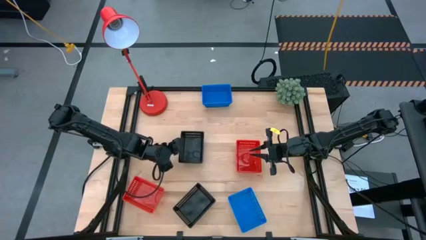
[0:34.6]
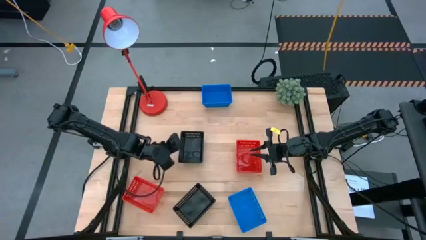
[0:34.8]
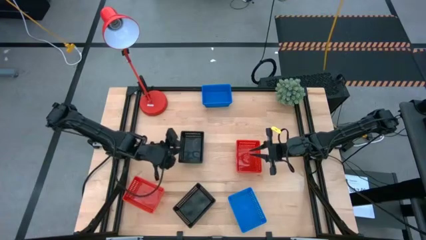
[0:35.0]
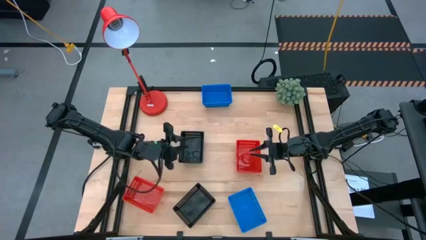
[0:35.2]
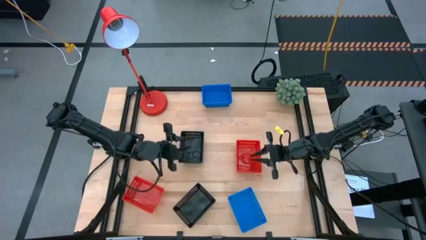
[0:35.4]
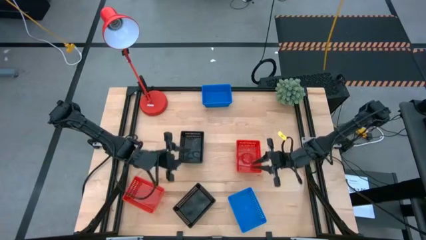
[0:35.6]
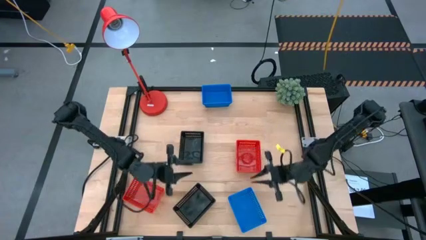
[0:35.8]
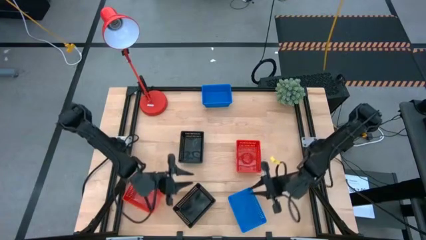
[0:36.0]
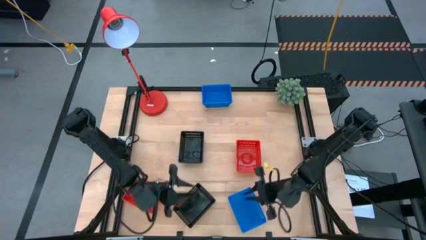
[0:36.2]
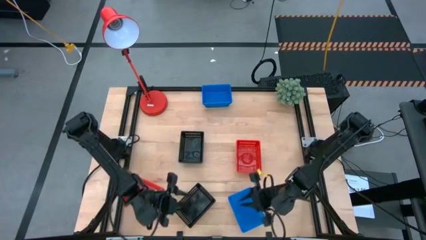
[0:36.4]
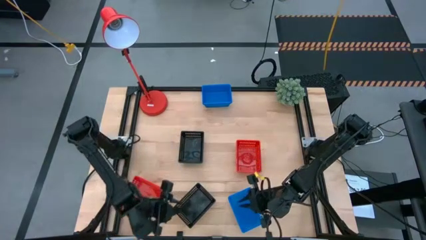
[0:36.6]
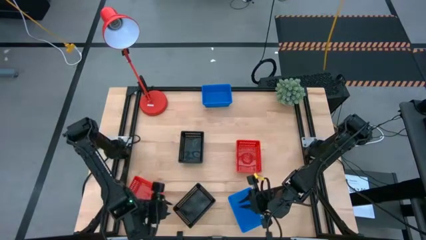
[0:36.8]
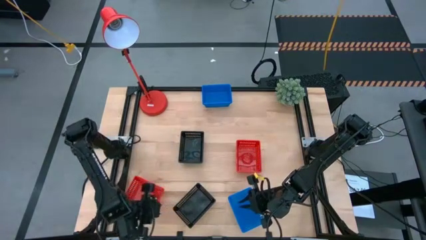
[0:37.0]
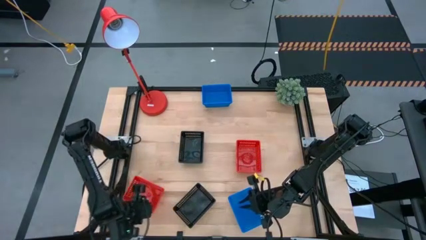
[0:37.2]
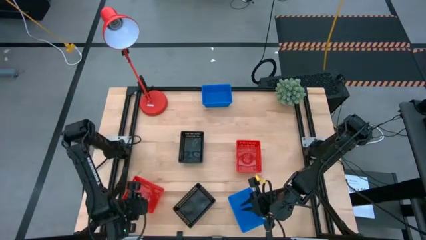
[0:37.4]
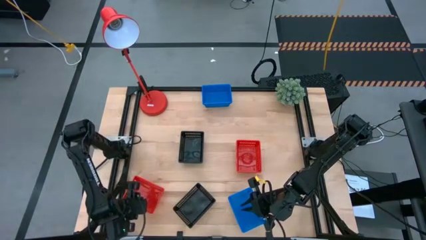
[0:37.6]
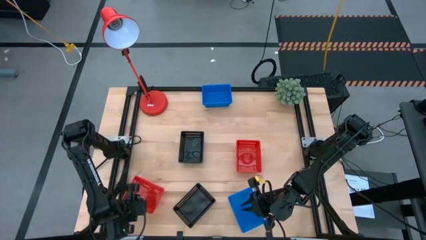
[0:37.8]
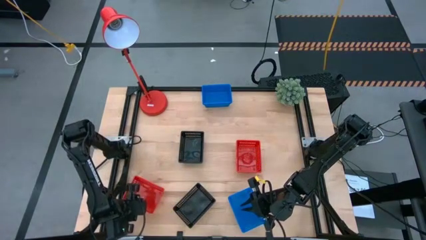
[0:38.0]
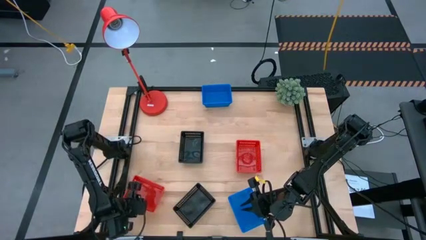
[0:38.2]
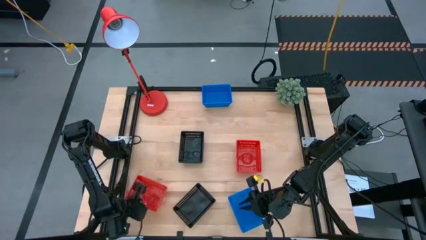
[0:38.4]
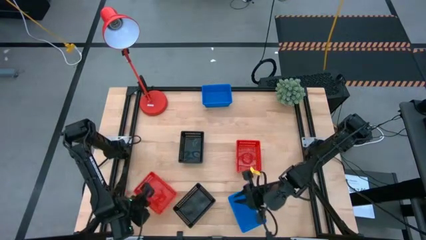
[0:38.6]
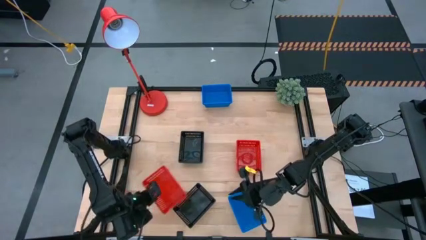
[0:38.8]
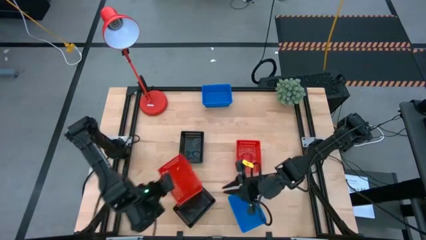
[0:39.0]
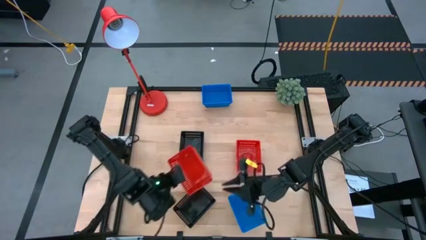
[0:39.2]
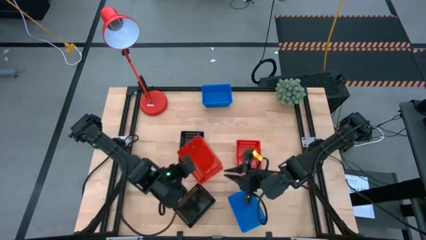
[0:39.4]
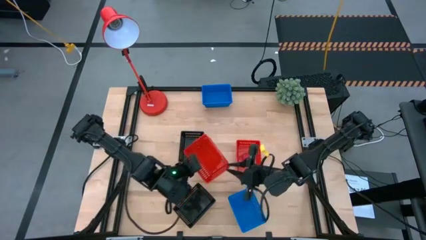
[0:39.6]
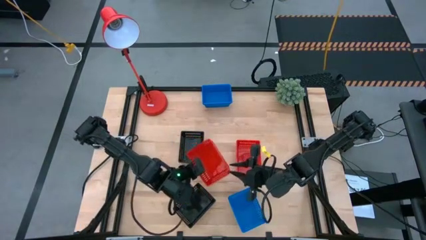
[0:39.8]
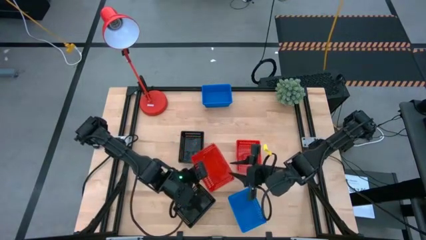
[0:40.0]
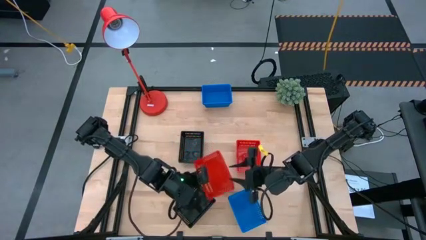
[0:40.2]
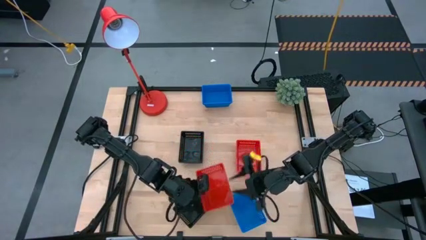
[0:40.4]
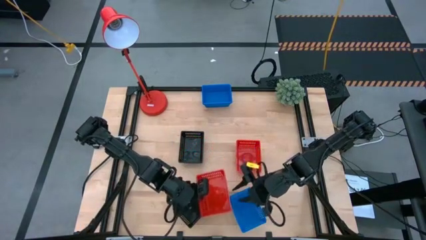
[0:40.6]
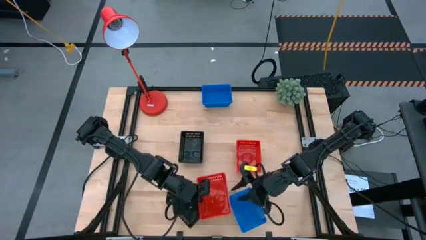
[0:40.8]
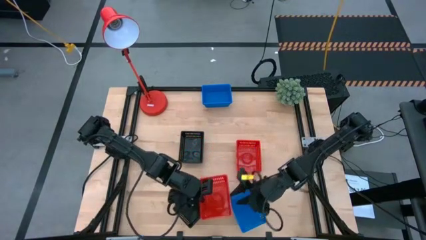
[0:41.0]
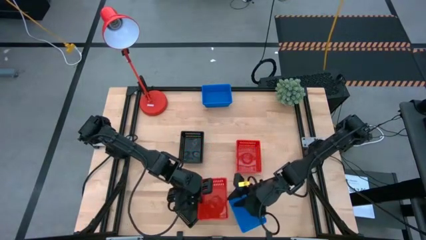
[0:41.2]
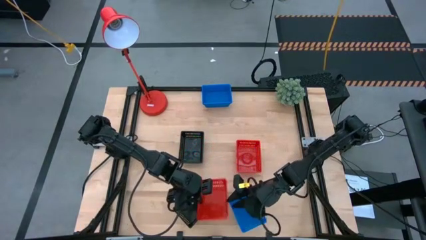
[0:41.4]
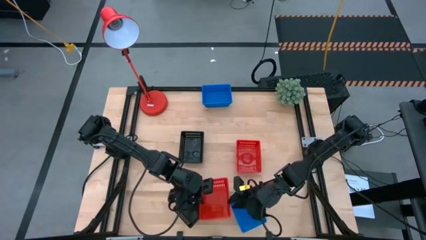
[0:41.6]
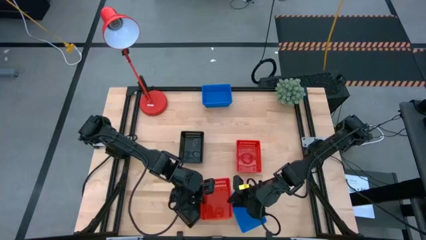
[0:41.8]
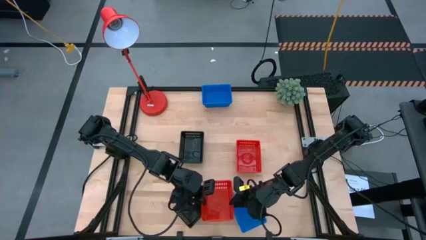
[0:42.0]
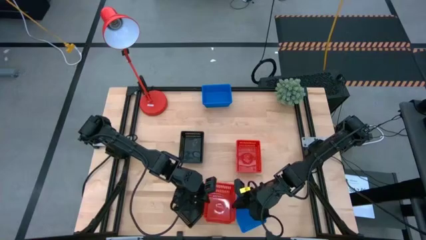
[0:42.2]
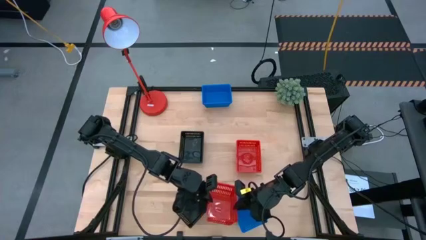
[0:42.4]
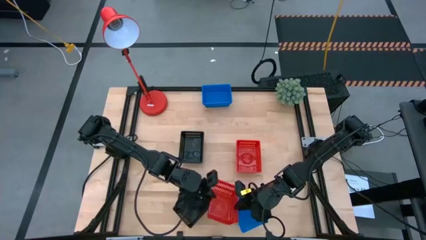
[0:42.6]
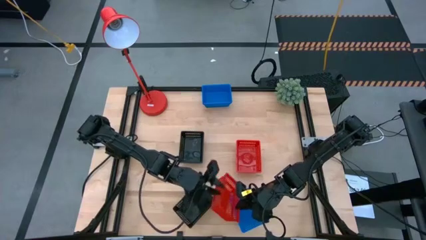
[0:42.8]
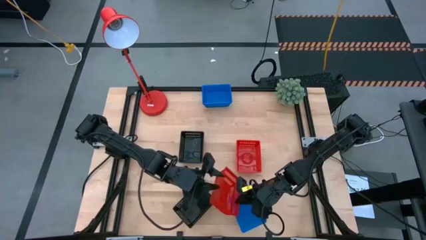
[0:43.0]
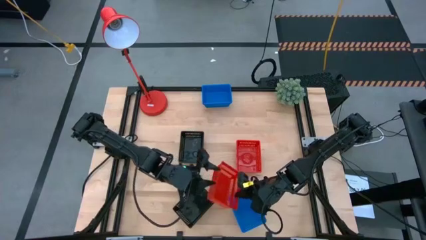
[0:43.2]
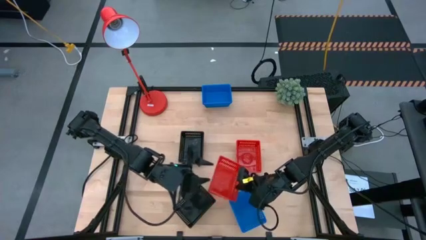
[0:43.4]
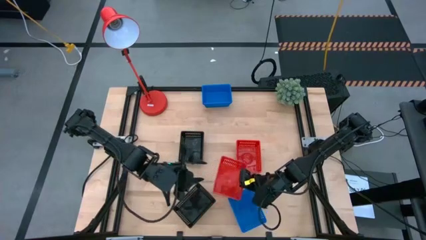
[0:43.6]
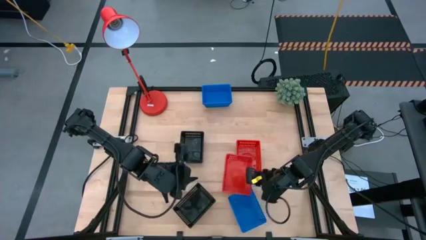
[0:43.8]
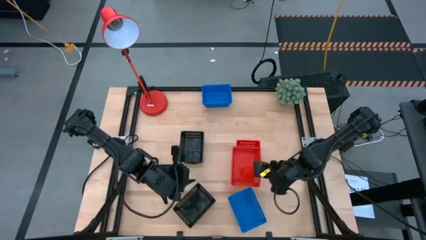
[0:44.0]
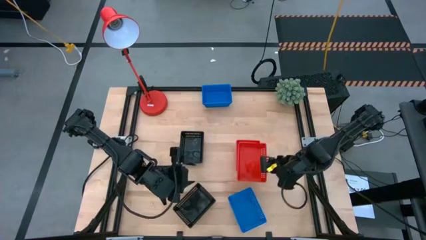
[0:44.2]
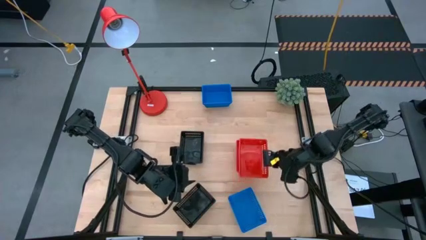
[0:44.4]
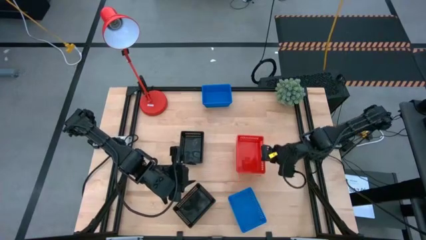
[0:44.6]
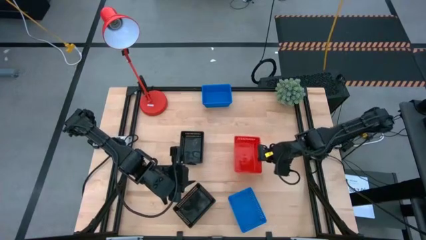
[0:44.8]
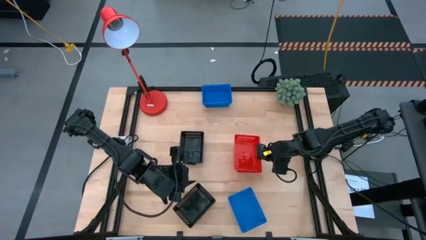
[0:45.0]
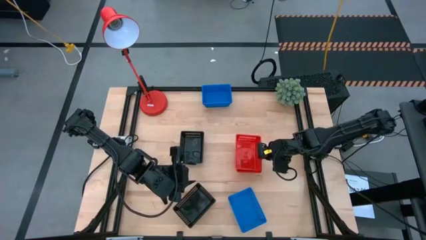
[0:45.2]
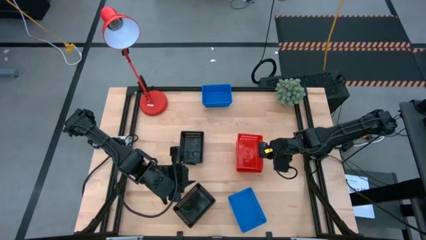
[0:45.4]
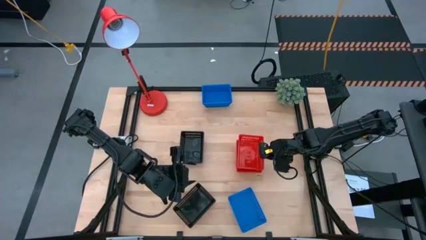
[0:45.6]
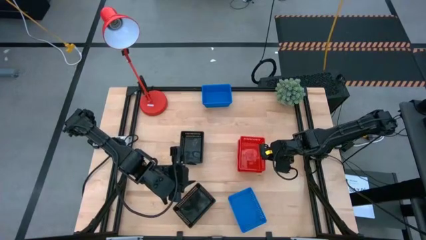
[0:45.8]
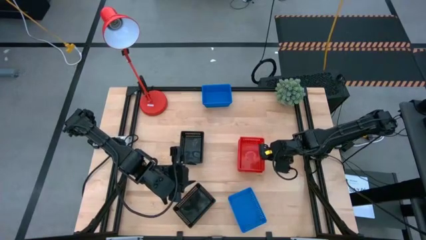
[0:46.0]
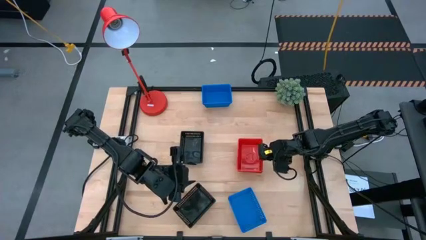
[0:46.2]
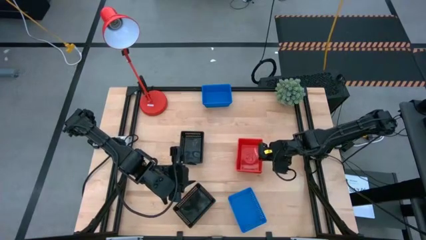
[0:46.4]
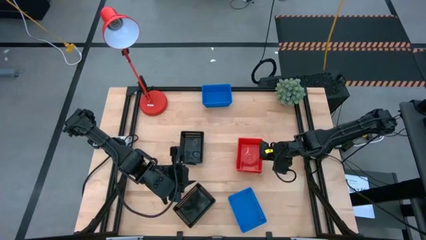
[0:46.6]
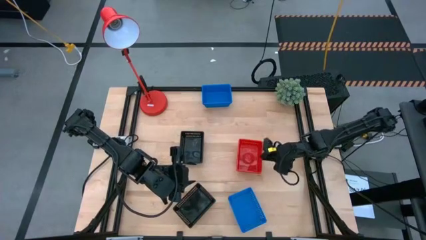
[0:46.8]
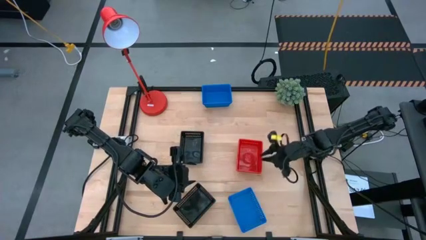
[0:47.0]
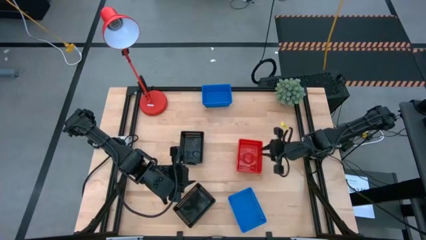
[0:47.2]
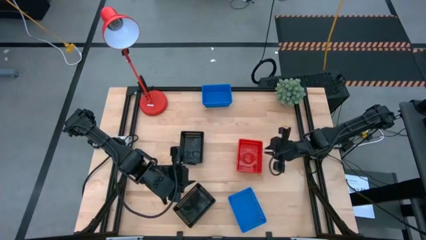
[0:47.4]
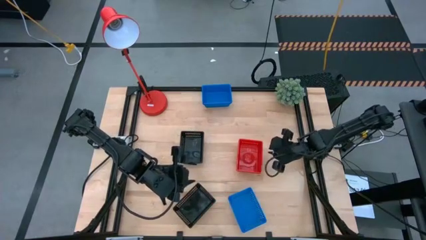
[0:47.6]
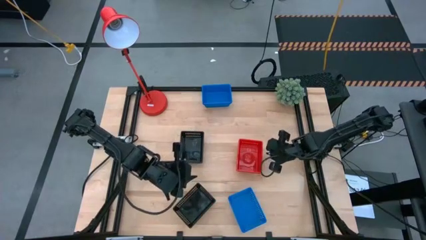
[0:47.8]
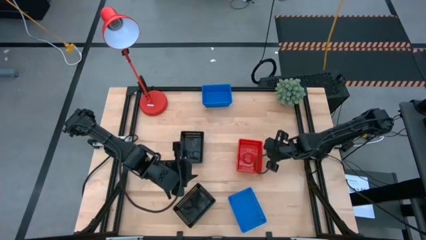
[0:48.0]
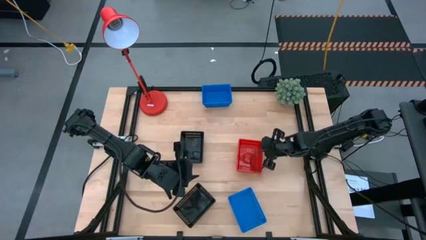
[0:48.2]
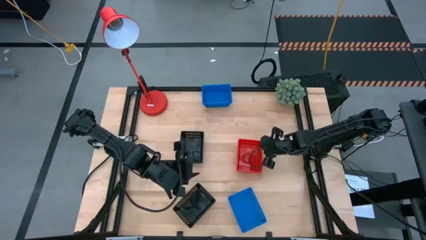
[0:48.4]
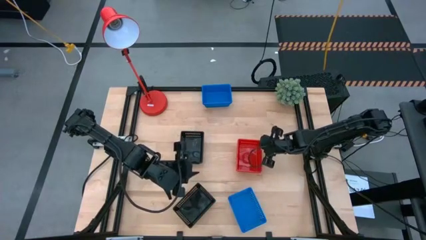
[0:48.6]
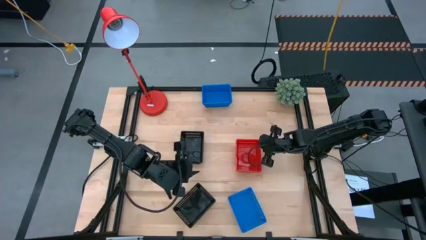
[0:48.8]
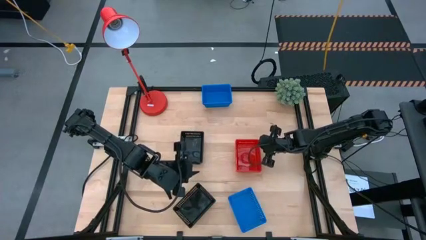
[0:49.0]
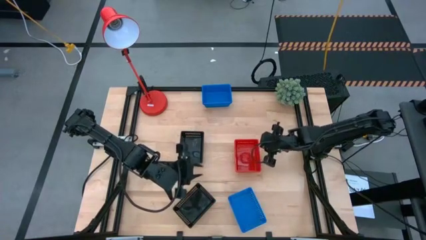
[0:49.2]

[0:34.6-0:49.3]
Stack the bottom red bin on top of the top red bins
